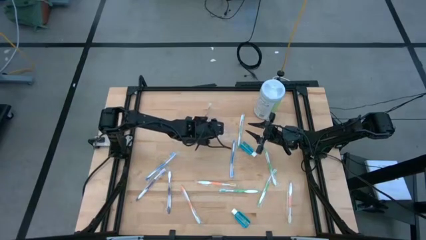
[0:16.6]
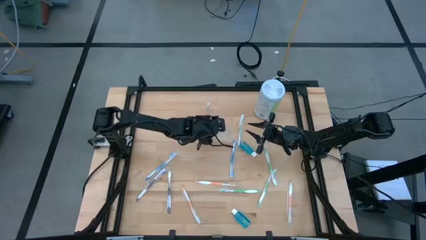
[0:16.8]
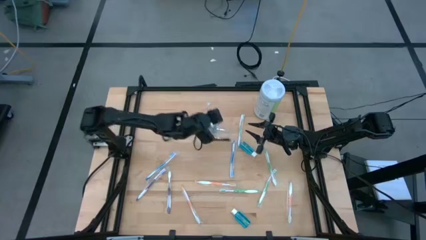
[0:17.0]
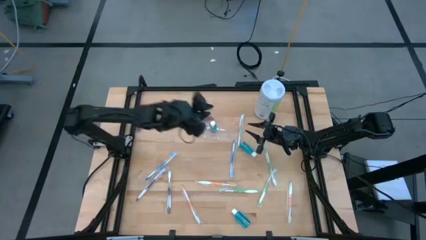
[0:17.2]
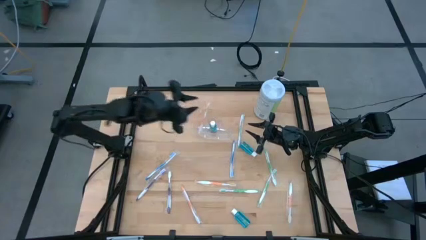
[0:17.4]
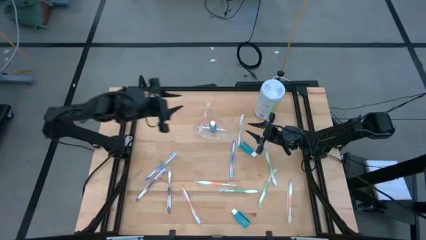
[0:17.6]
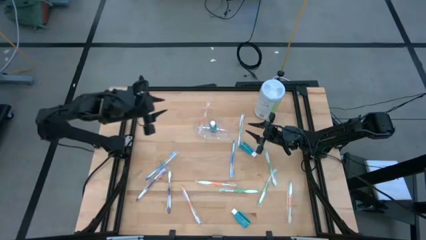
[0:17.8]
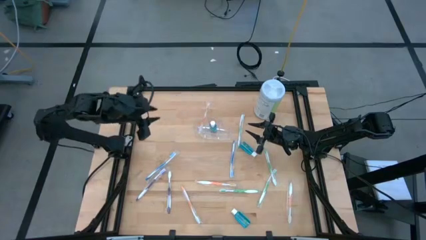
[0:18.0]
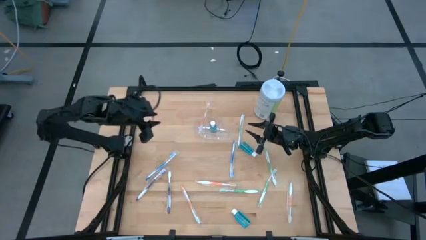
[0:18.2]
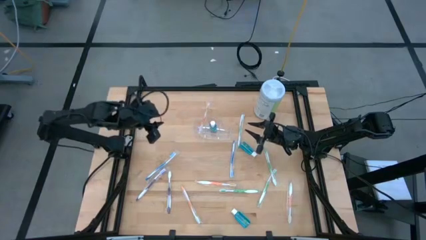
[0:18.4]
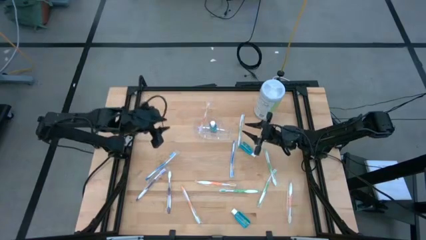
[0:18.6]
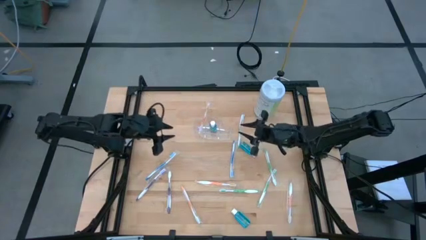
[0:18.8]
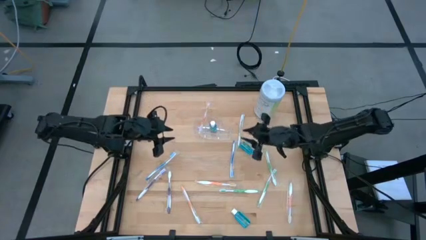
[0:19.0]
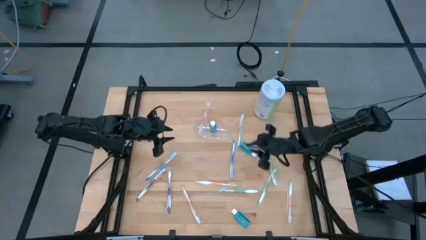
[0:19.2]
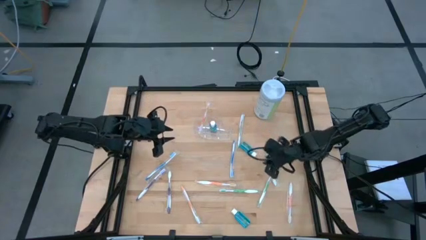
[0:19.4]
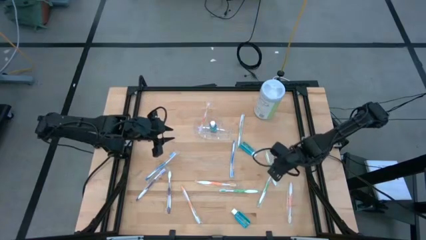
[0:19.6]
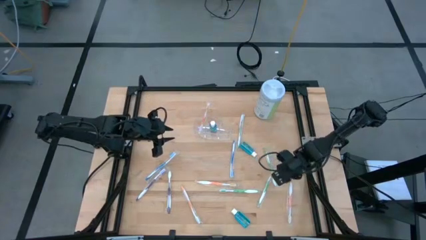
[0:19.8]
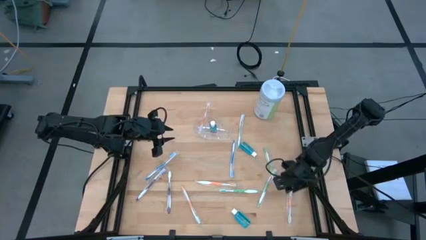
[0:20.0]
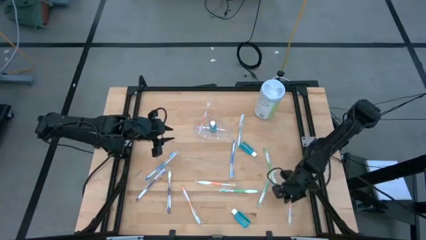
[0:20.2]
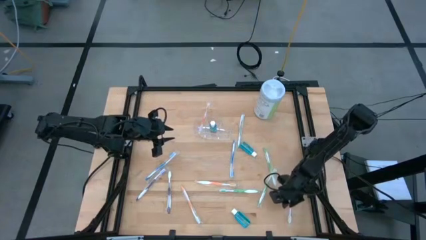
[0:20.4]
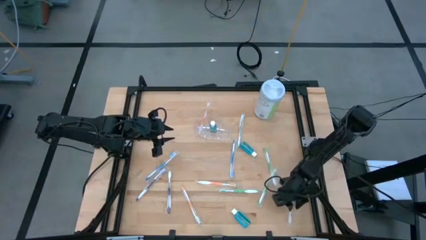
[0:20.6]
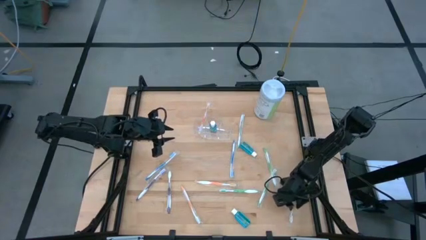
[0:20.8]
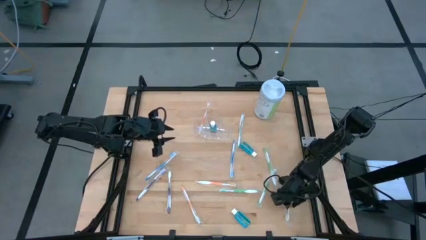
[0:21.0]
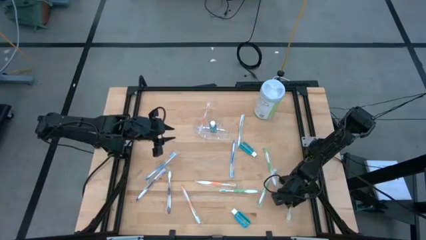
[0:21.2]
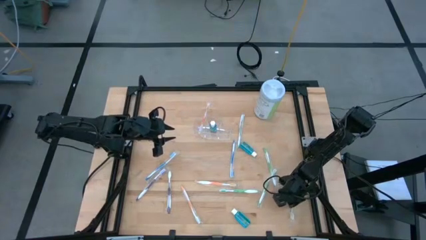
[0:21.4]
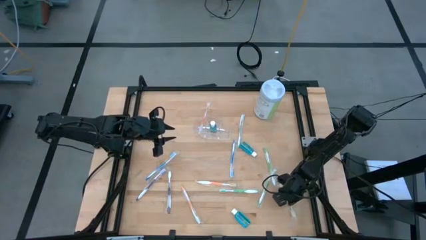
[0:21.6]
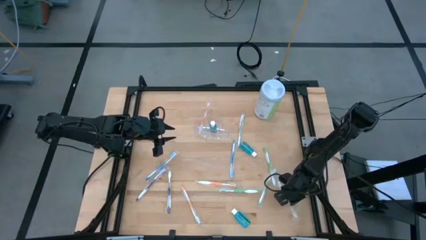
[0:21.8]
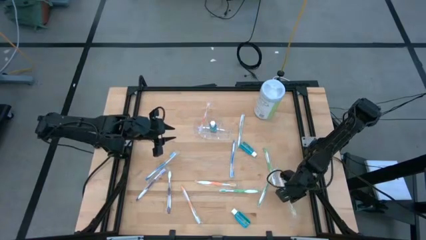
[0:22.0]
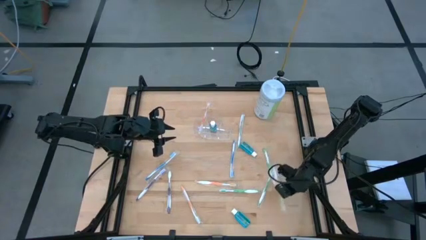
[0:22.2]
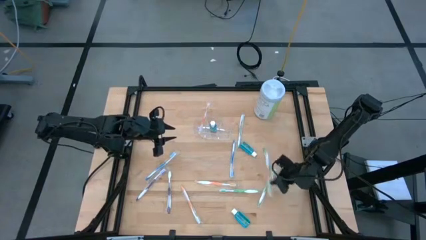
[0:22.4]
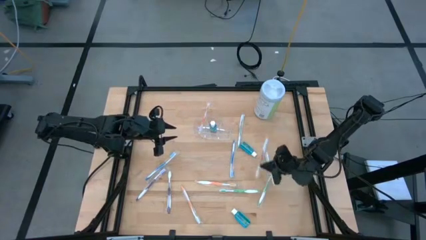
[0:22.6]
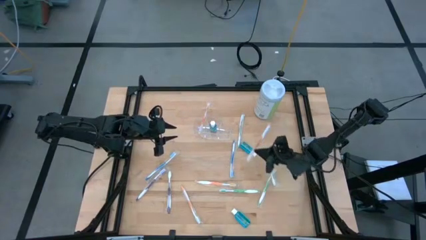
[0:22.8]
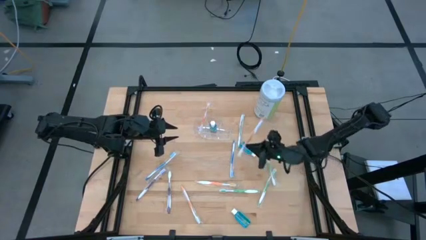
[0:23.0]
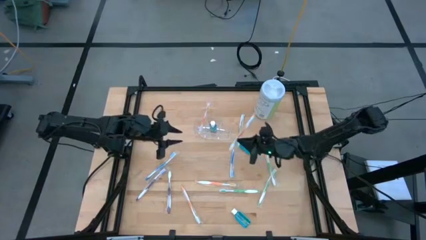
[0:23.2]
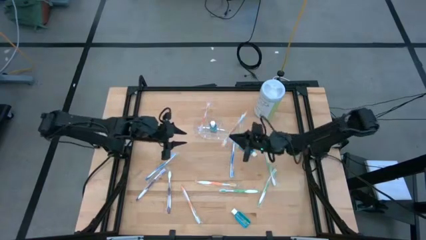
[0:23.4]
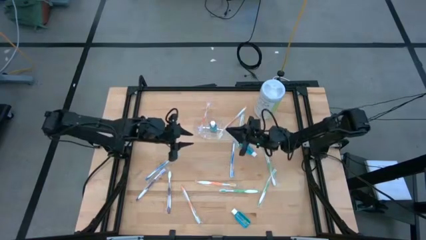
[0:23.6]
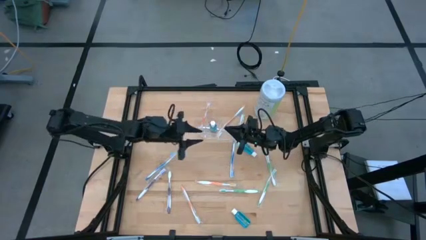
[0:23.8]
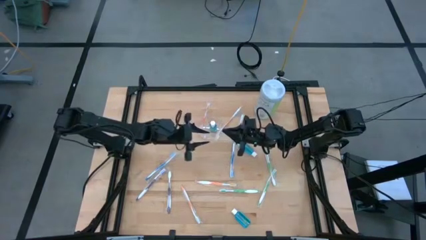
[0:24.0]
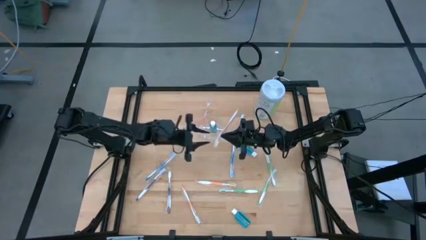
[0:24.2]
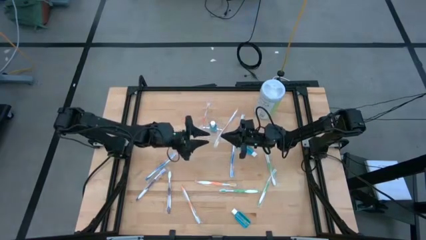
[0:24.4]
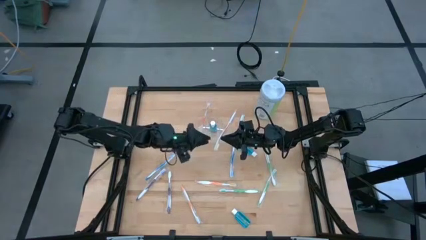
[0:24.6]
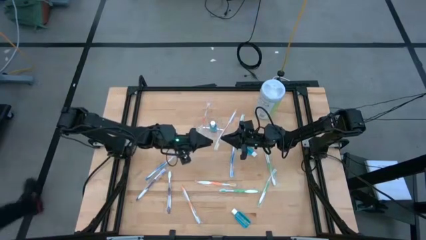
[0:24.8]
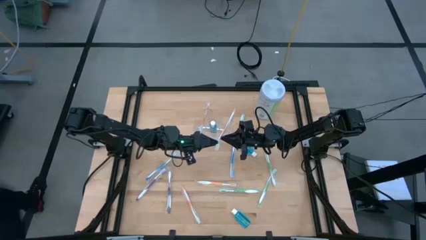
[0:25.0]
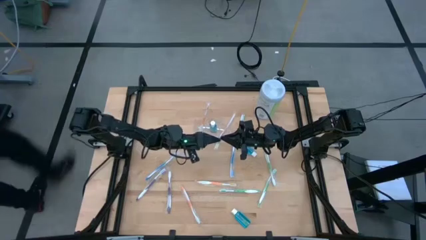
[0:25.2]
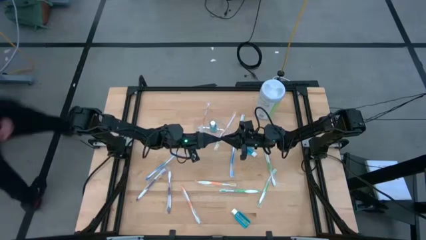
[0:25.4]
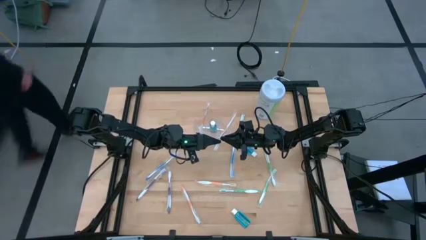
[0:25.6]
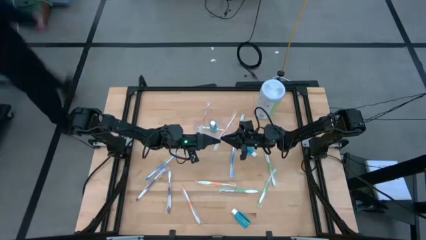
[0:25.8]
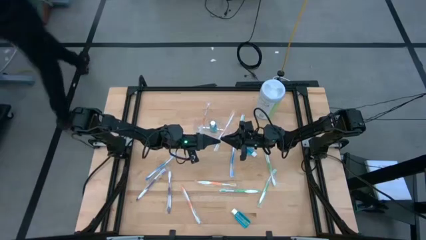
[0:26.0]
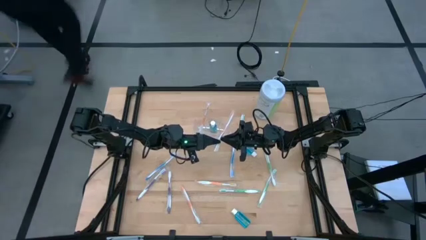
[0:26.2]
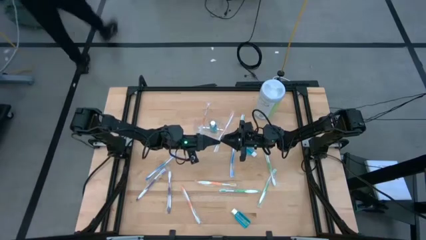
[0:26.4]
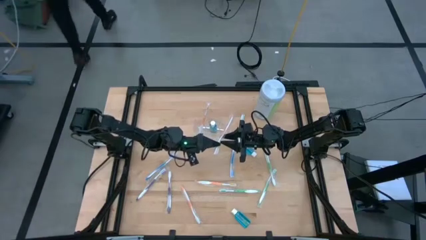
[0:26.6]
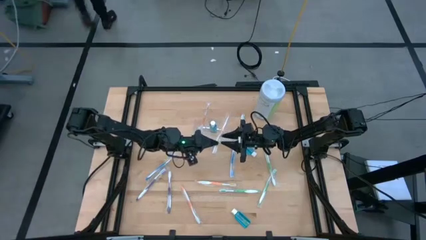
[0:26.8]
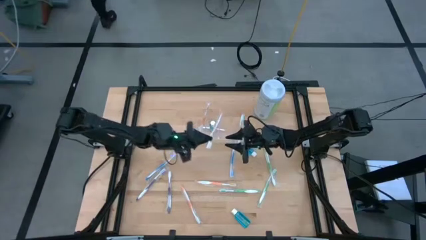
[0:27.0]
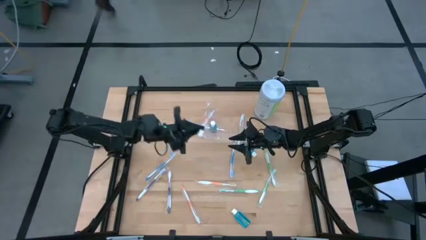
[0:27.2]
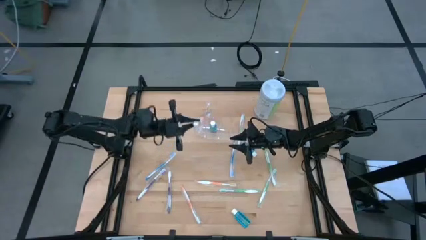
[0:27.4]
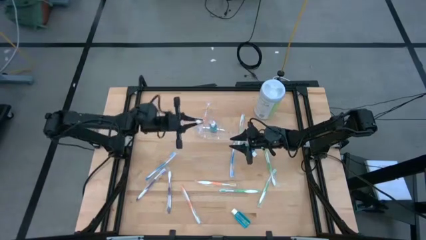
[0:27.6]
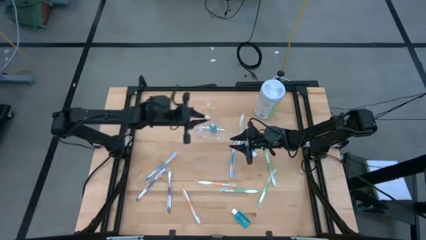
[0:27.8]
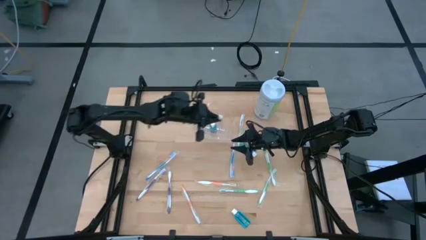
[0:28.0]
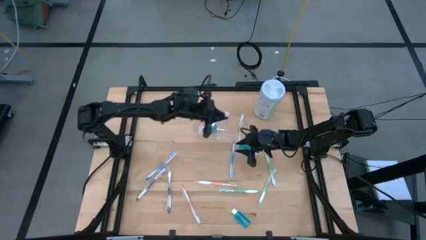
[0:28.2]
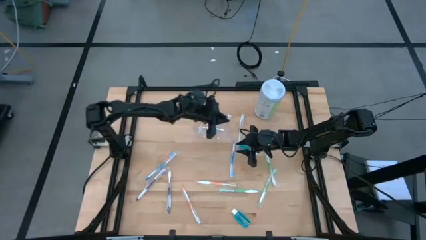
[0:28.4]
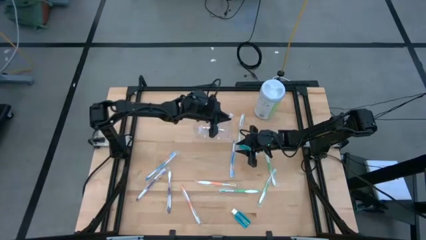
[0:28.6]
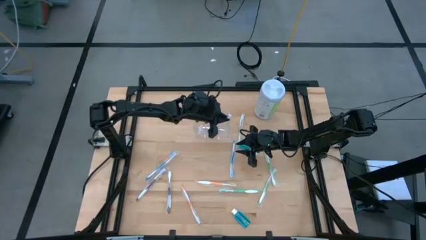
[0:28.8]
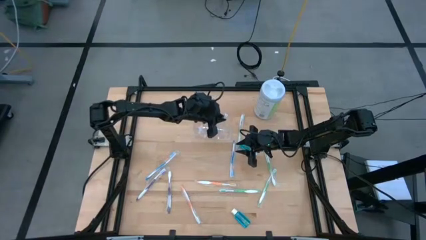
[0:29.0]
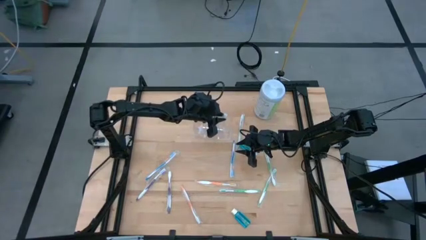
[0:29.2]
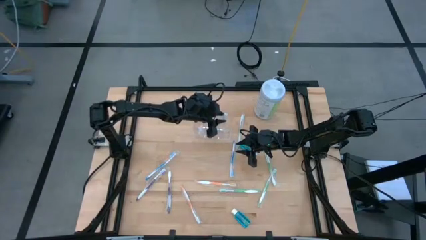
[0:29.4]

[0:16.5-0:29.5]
Task: Pick & Place toothbrushing station
Put the bottom right orange toothbrush into the transparent organizer

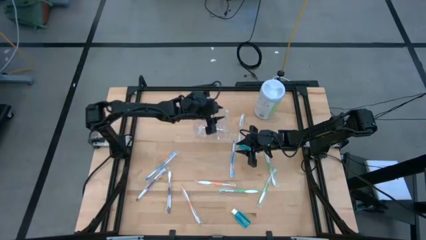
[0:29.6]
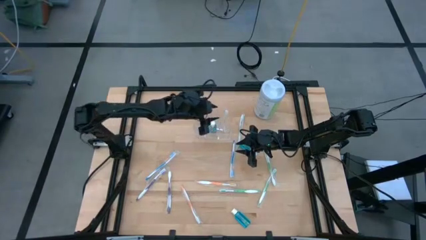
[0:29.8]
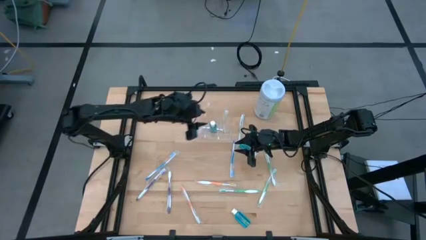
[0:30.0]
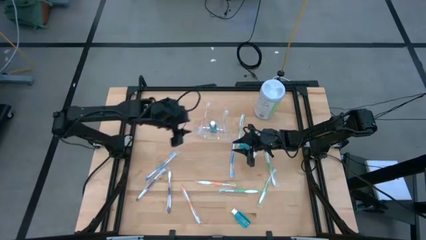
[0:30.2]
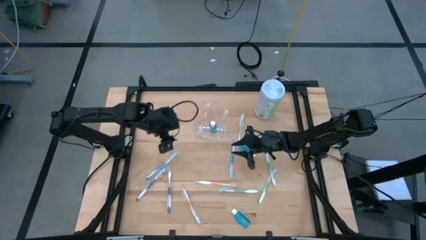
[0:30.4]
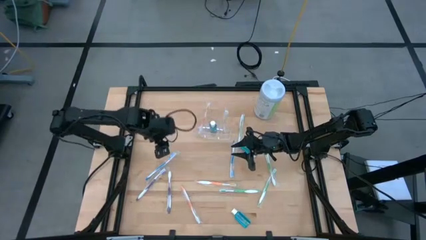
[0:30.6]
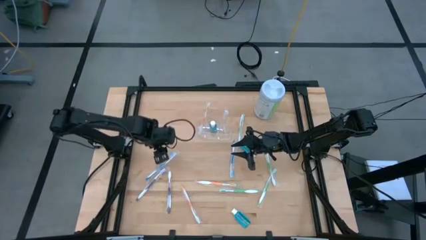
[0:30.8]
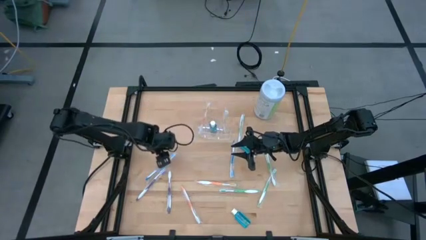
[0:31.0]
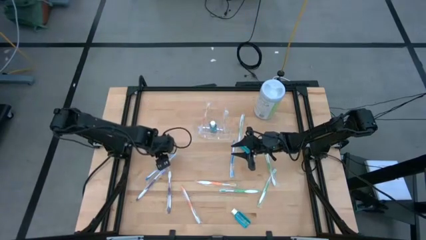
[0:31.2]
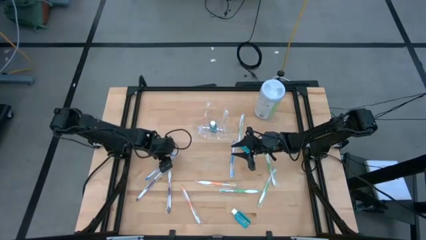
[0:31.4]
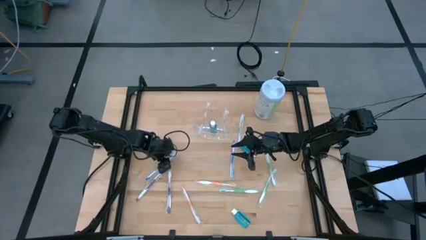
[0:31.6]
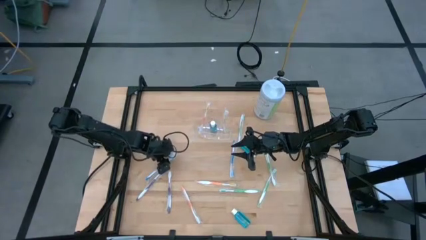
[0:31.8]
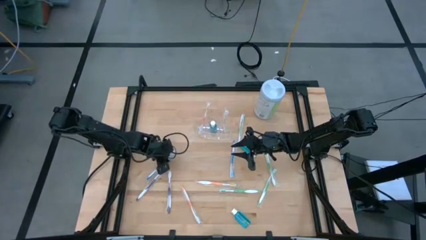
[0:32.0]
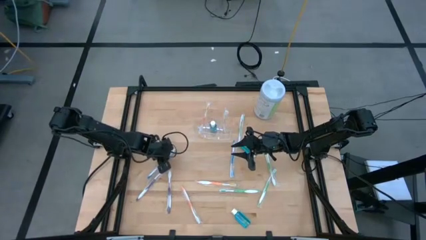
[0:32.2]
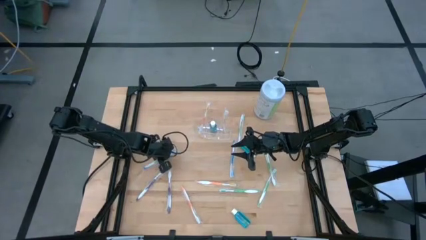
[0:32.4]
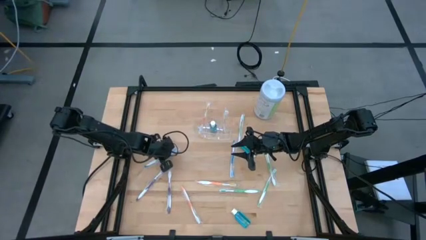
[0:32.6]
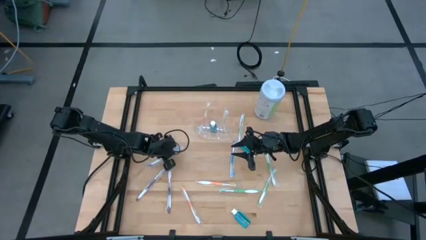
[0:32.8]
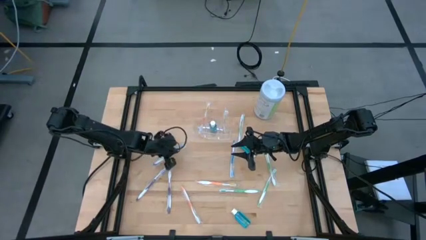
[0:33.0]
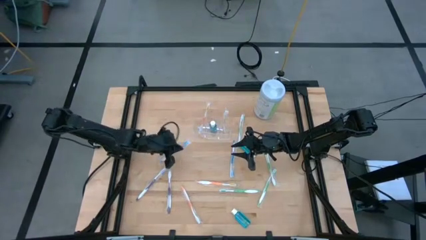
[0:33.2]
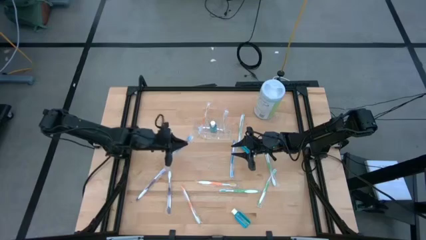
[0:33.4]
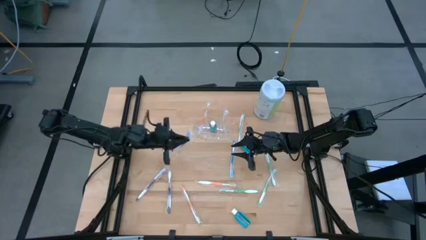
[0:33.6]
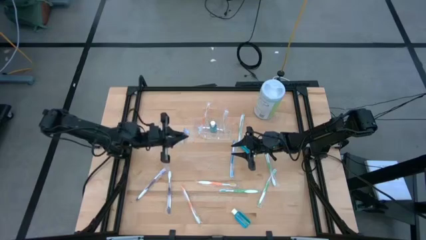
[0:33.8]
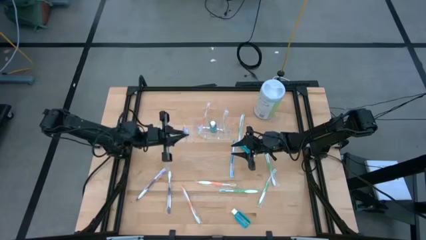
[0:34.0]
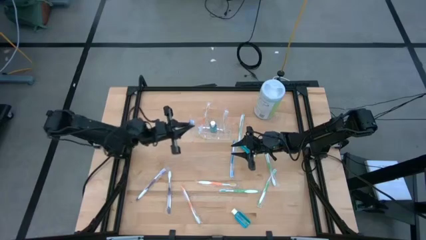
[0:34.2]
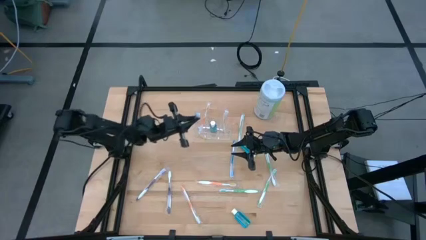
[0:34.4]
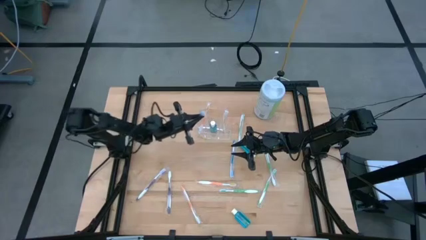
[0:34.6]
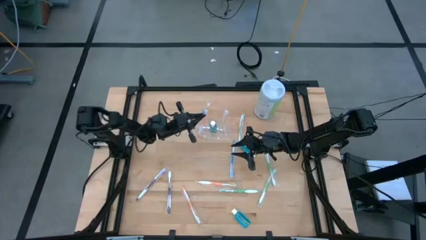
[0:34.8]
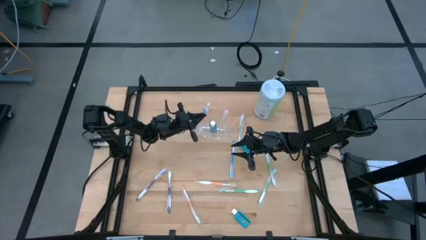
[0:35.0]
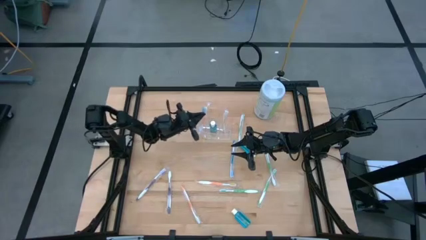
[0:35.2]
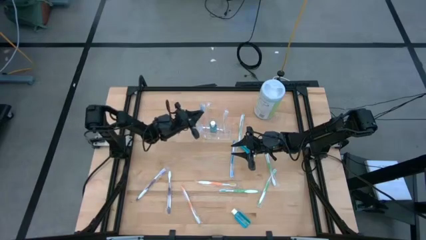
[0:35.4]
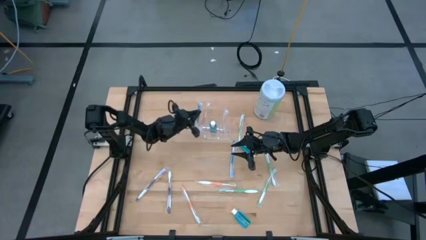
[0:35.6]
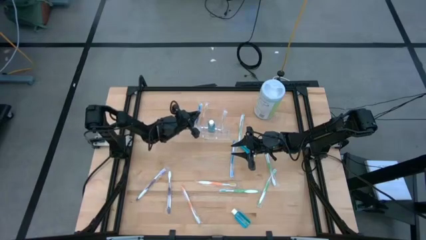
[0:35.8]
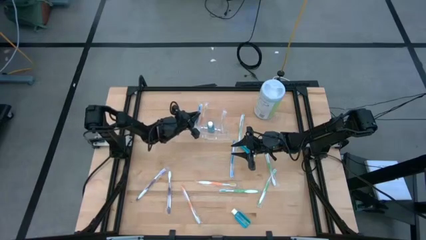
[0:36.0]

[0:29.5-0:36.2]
Put the left blue toothbrush into the transparent organizer
